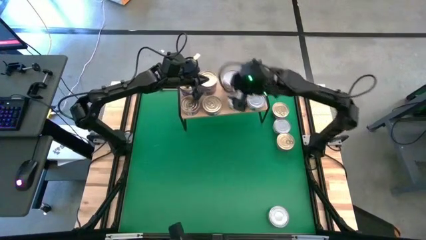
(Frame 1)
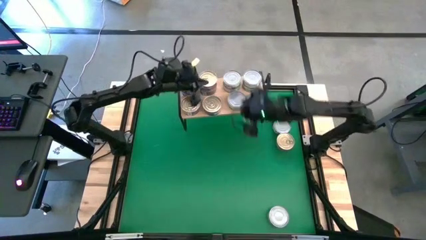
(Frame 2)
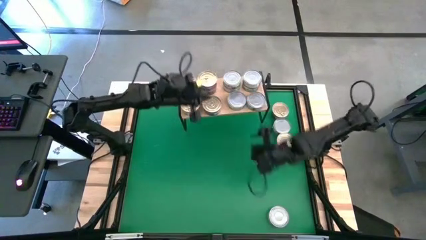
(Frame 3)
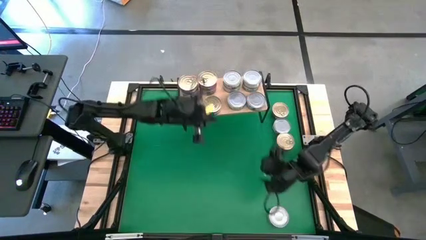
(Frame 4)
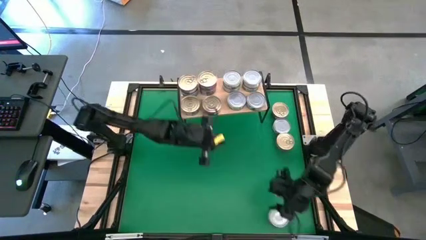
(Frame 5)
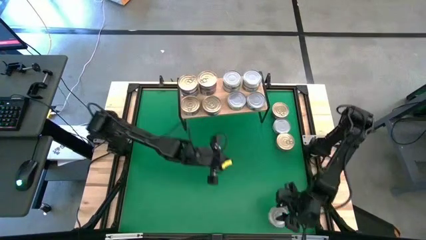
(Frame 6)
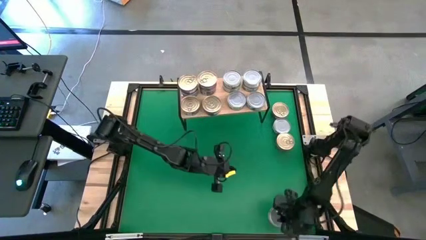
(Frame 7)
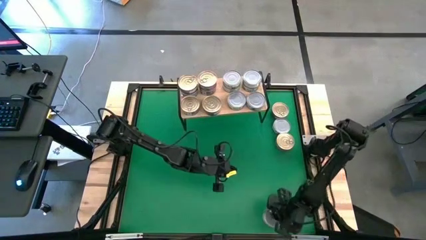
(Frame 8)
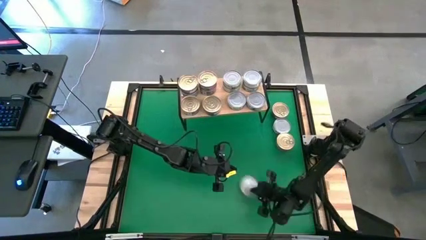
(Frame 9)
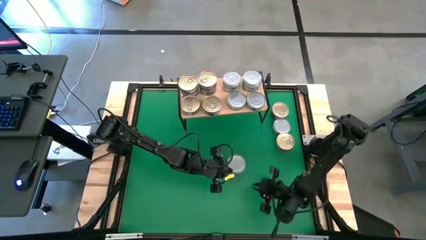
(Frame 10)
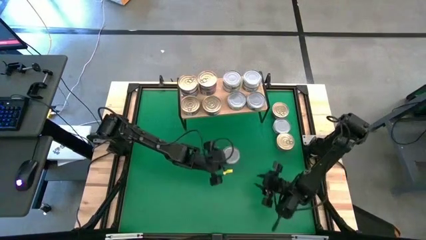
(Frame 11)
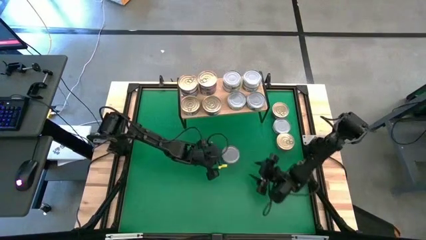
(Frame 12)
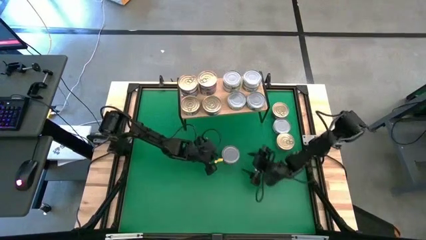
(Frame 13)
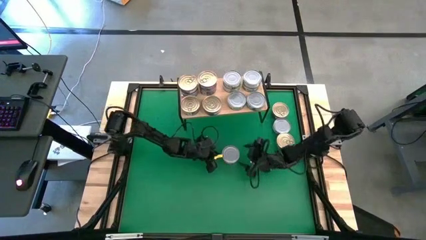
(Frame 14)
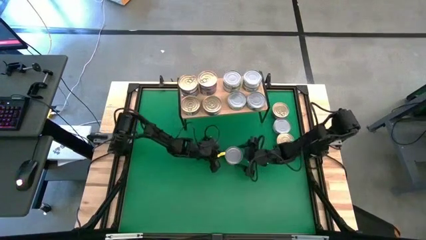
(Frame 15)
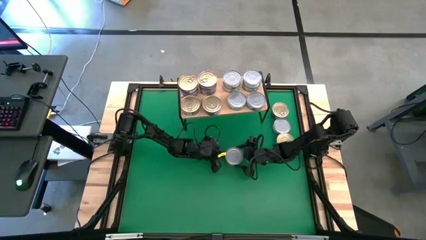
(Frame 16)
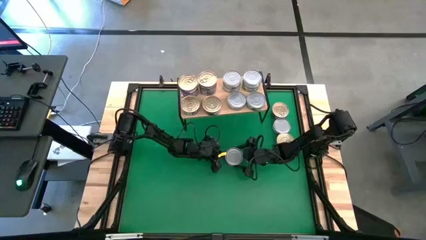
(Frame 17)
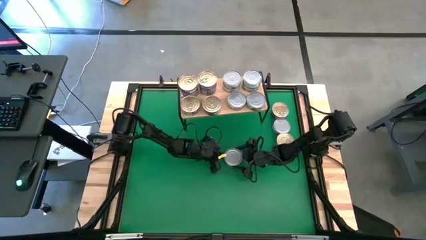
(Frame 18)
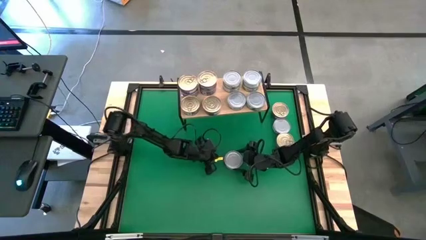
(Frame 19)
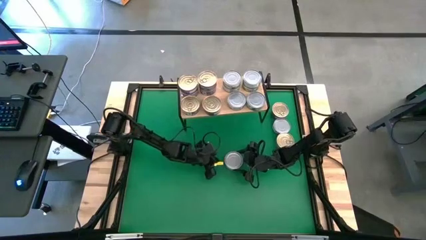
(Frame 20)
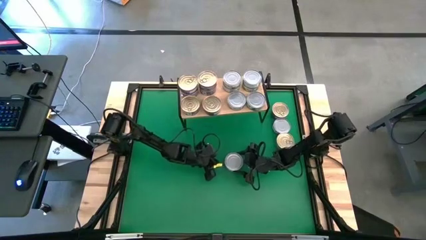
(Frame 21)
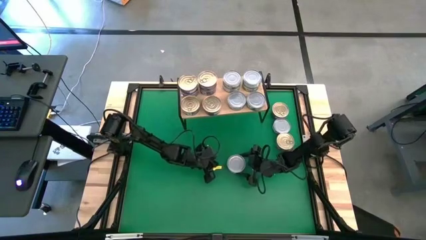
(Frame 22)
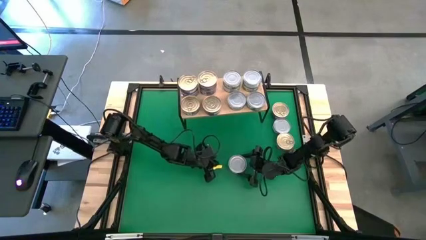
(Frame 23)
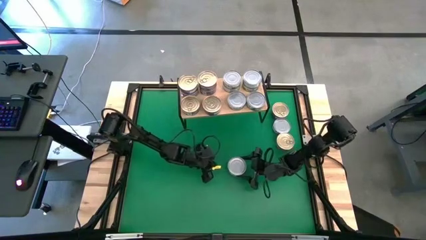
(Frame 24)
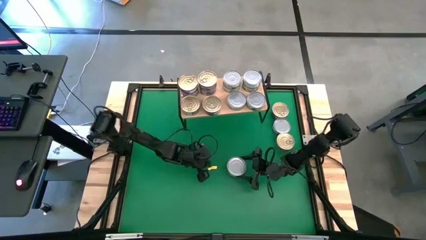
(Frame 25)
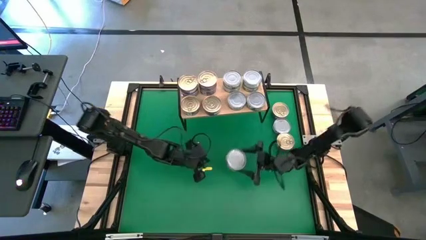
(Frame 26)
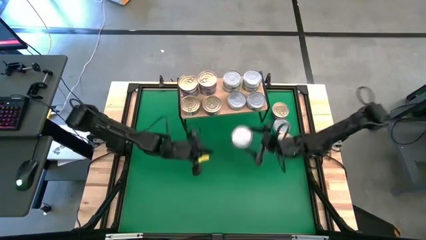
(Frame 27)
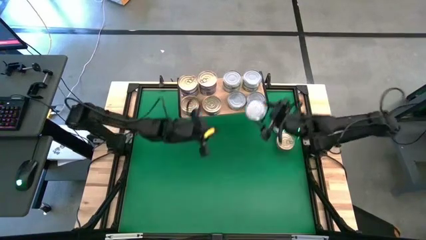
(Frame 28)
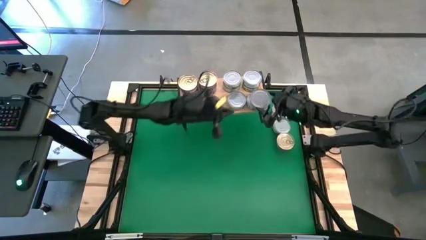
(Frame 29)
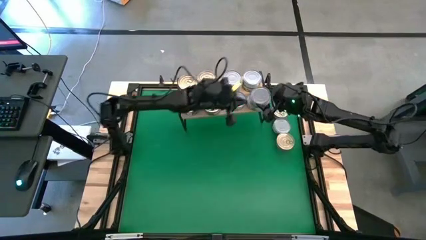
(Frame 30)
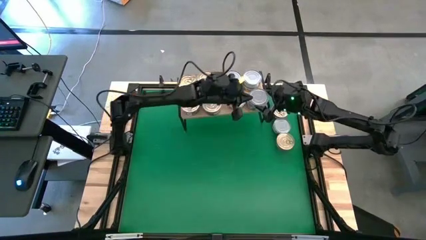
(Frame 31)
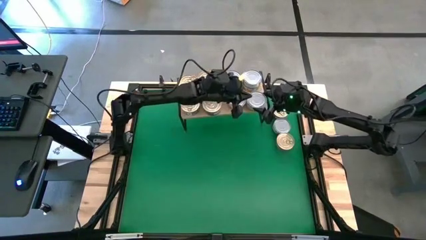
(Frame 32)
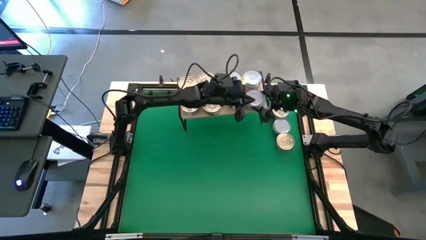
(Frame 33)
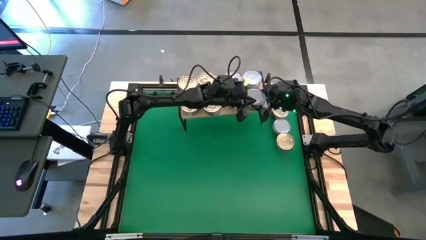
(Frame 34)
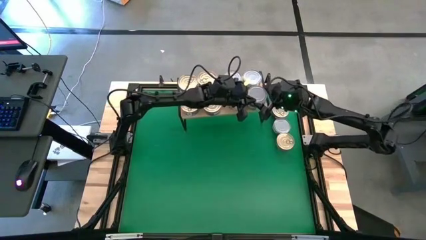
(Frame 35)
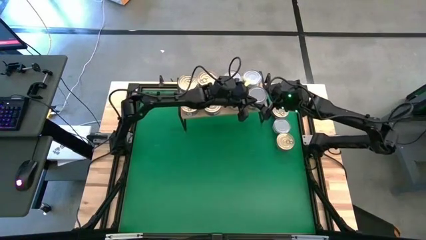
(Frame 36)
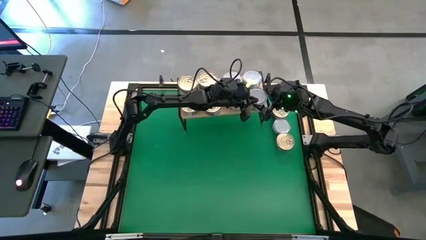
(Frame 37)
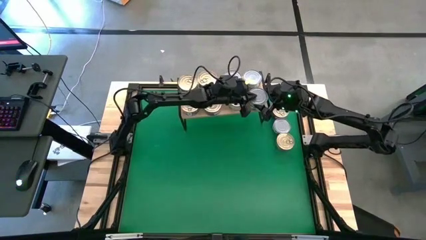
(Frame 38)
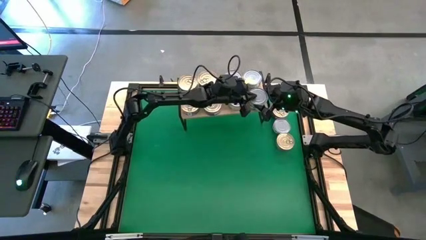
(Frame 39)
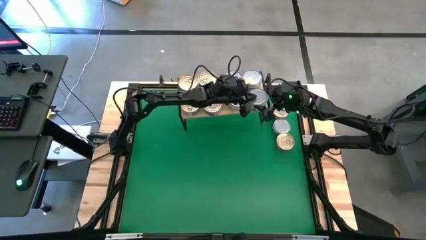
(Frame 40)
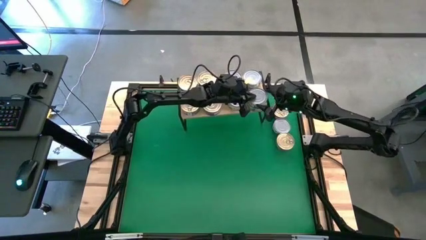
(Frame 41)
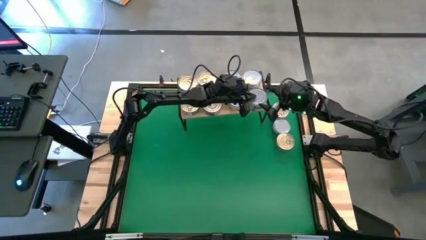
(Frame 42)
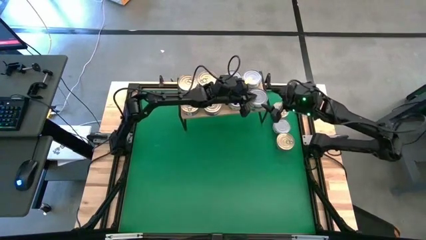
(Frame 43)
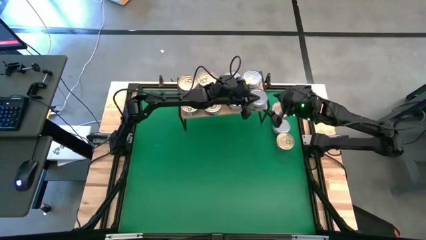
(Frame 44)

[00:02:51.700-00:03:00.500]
Task: Stack canned seafood by type on shelf
Stack the green tuna can on top of the other green tuna can on the shelf

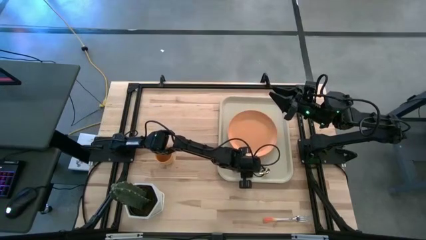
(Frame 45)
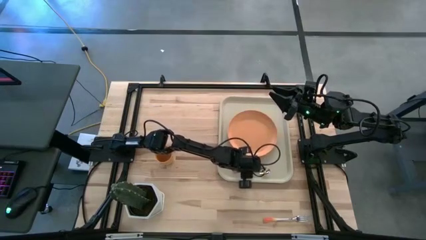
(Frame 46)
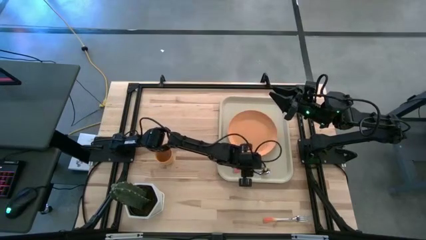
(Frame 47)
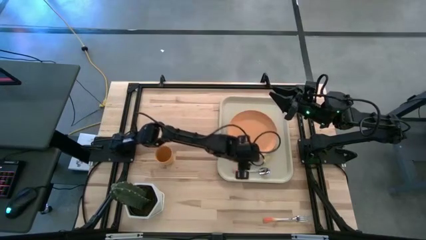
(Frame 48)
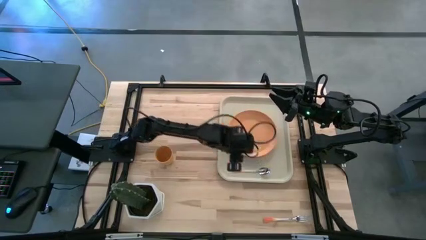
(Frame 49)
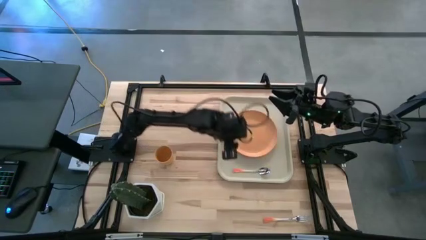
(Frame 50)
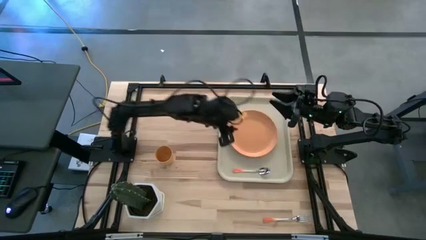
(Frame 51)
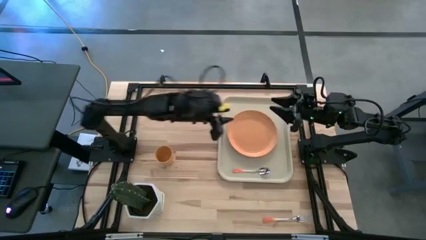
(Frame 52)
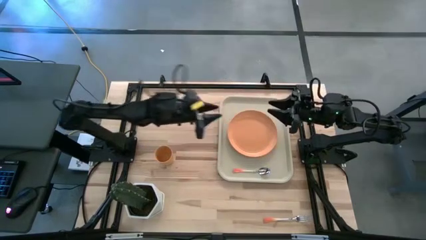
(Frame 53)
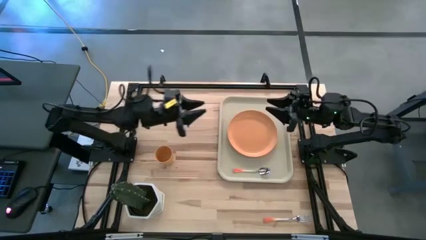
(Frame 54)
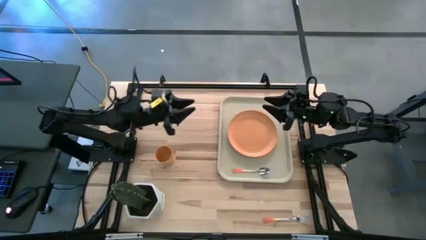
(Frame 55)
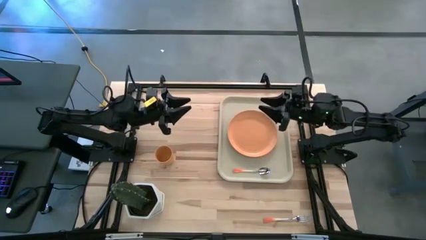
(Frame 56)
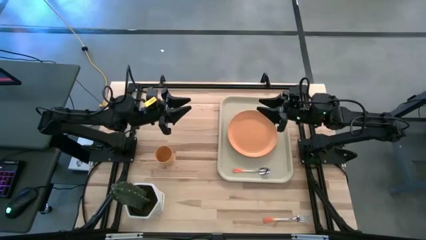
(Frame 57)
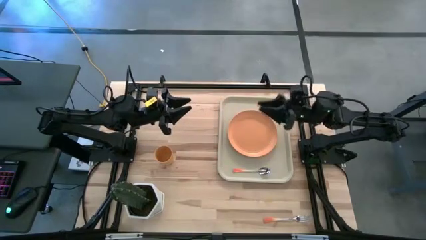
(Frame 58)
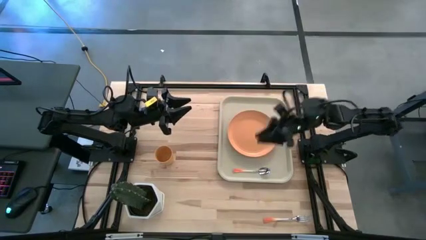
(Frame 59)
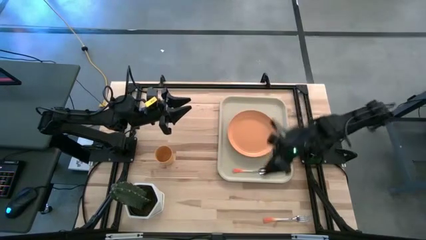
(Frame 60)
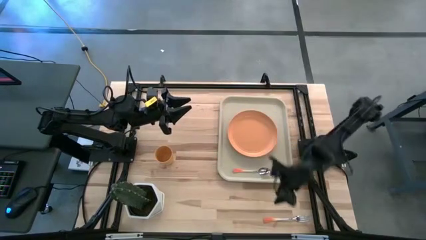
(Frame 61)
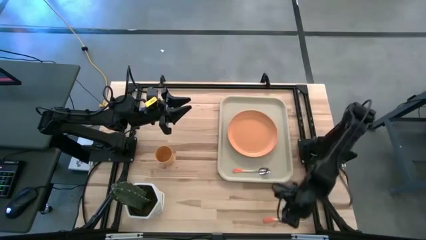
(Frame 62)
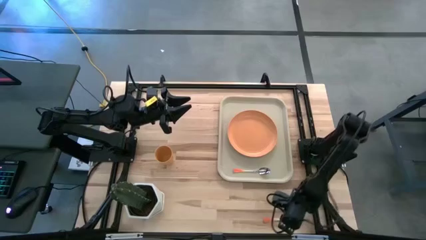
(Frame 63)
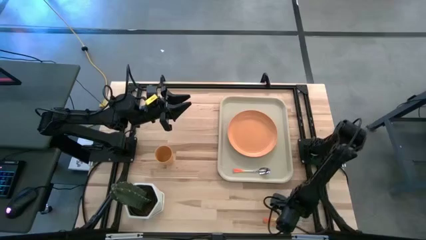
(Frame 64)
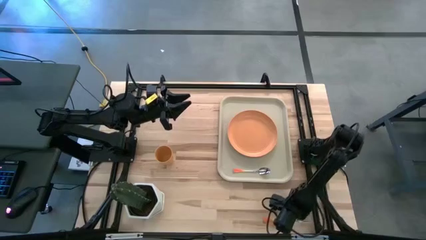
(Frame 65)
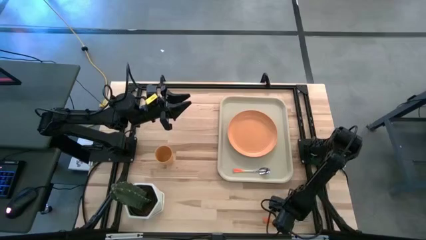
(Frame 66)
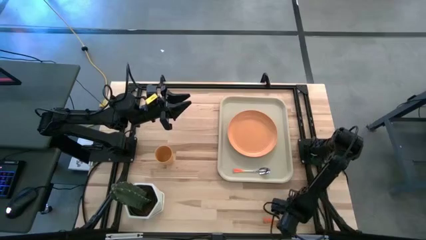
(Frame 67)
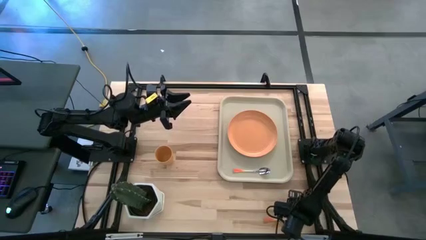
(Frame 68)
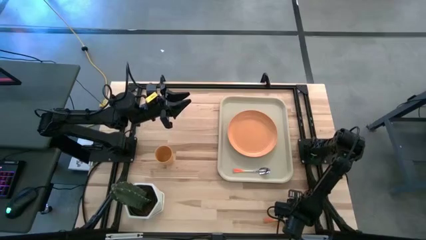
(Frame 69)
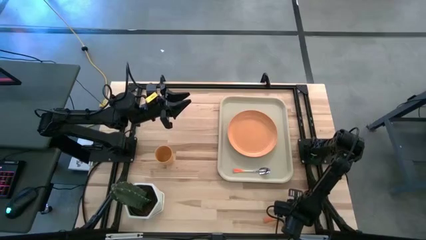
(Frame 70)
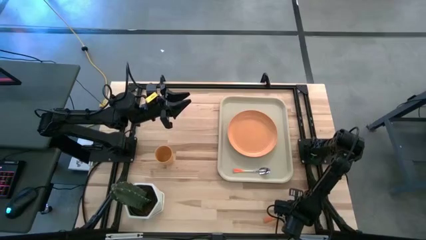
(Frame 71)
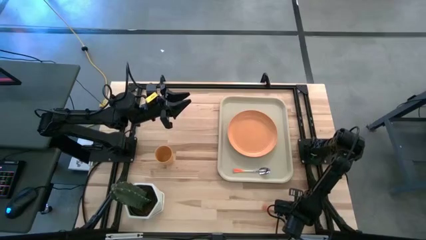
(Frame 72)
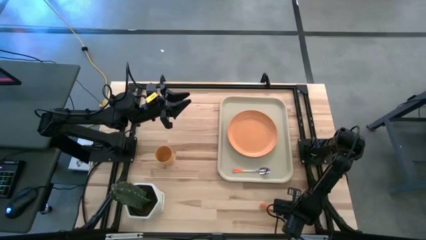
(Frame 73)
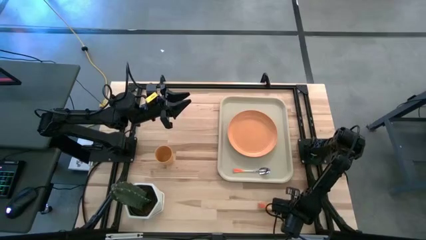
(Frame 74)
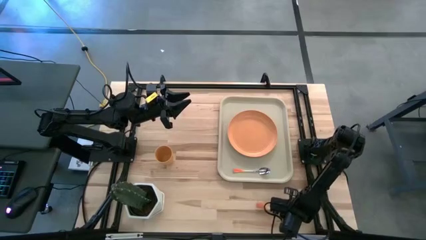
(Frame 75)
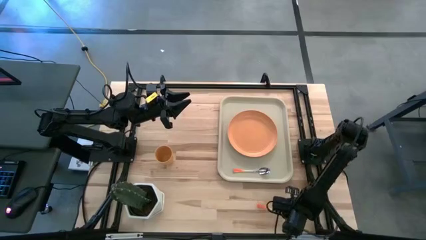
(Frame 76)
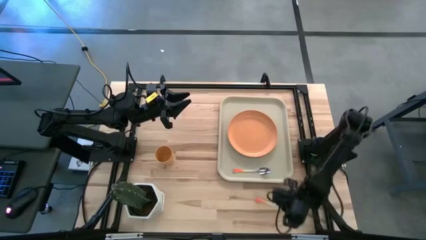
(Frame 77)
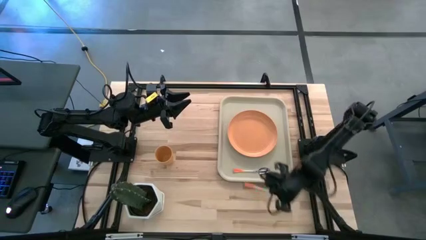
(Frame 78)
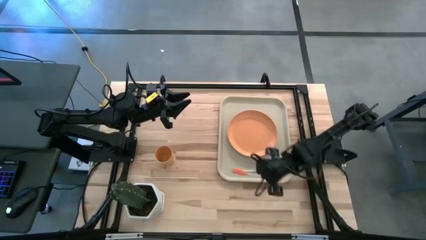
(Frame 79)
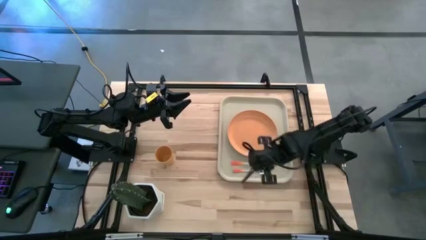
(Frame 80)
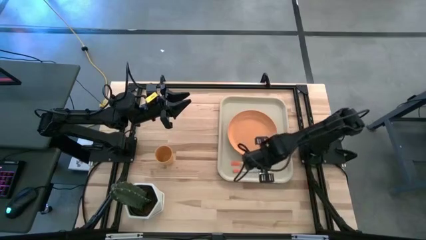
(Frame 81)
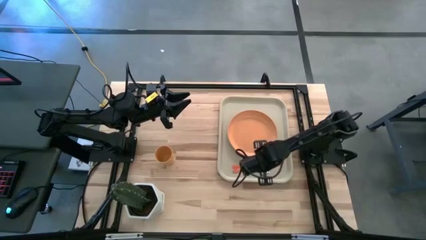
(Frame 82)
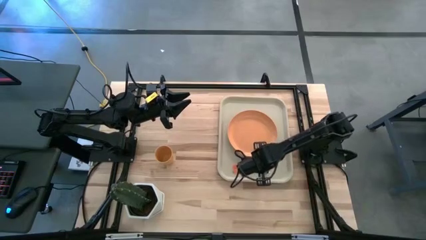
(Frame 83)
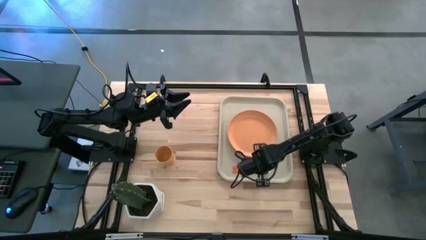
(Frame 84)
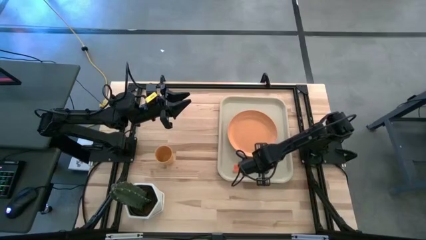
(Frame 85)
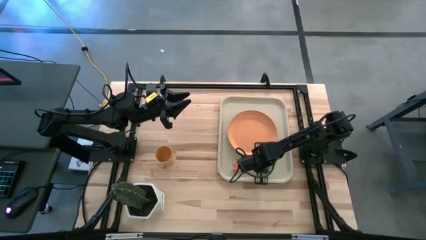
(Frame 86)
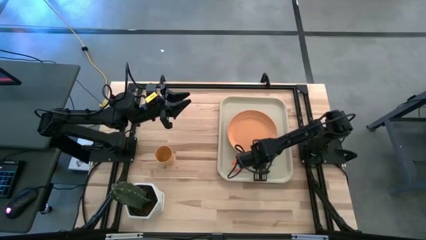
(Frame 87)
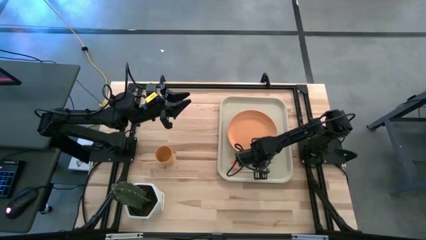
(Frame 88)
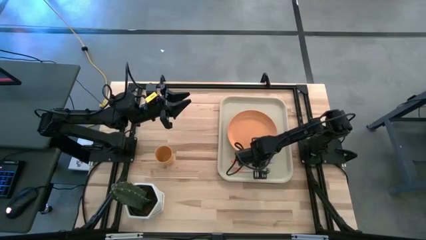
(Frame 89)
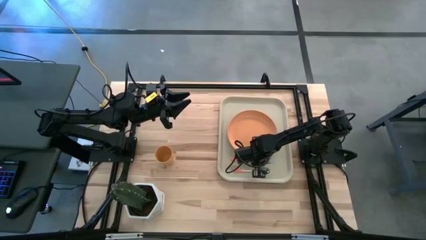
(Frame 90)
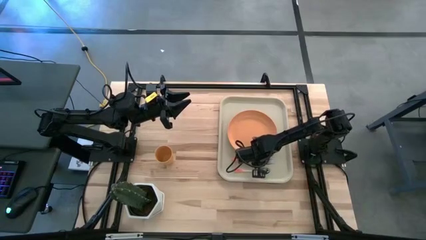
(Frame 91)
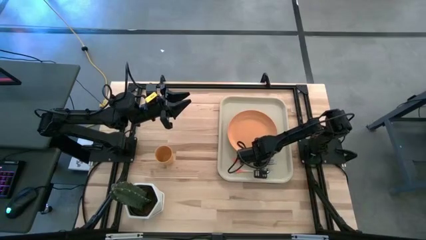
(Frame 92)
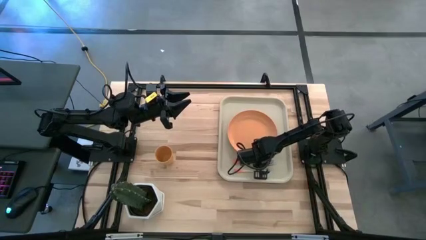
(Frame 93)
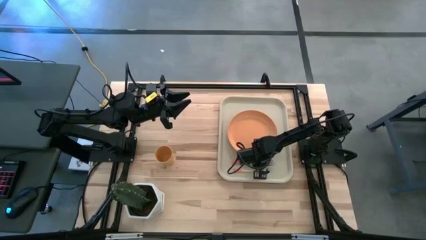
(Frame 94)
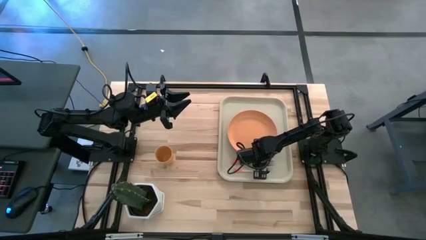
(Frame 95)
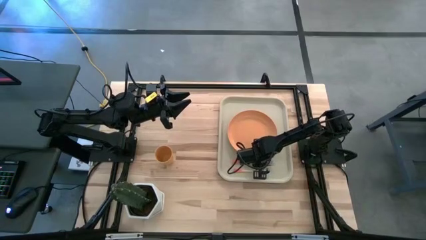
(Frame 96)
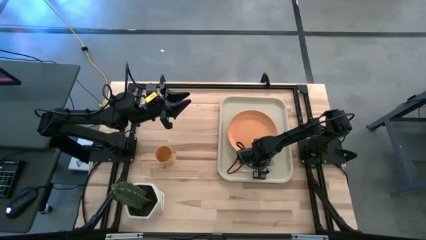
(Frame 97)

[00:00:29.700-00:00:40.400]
Task: Pick and place plate/cup/fork/spoon on tray
Put the orange fork on the beige serving tray beside the orange spoon
